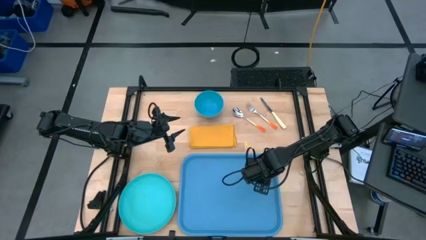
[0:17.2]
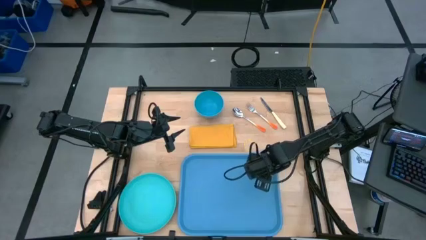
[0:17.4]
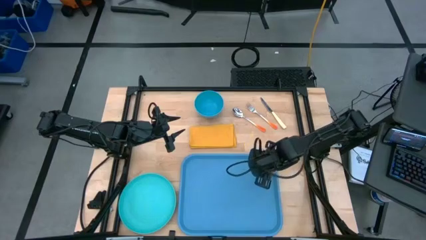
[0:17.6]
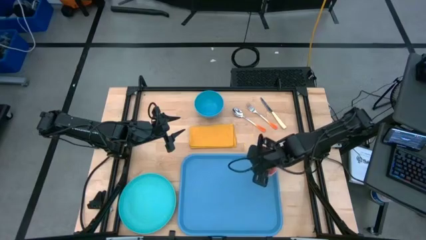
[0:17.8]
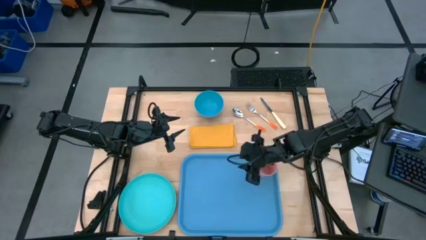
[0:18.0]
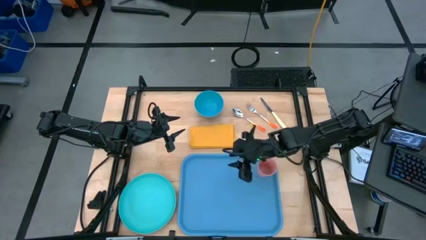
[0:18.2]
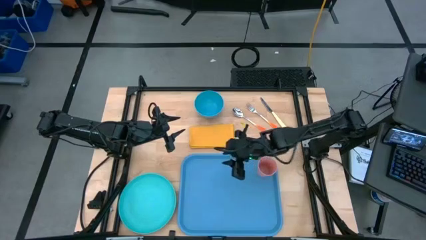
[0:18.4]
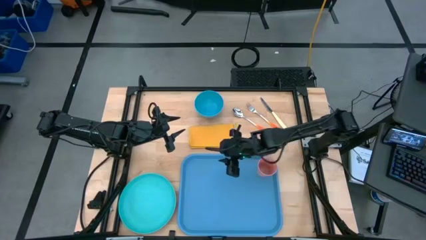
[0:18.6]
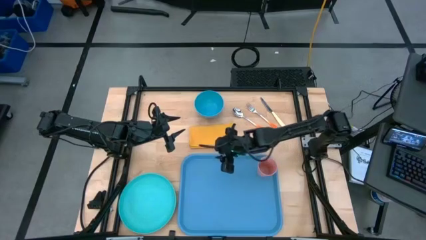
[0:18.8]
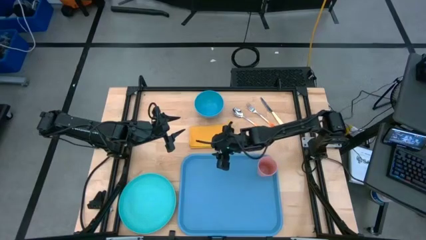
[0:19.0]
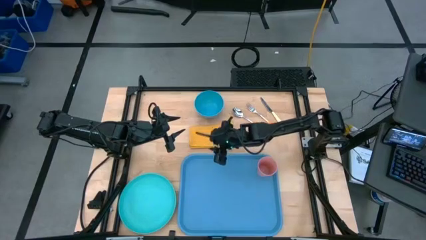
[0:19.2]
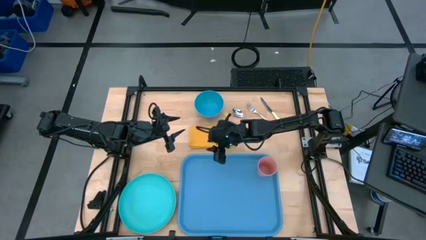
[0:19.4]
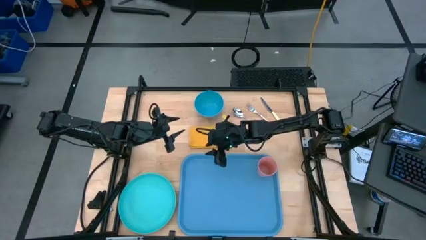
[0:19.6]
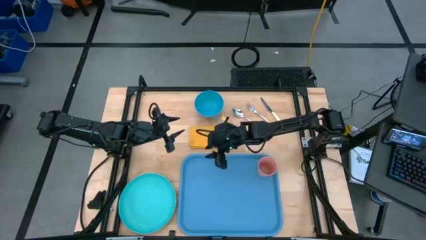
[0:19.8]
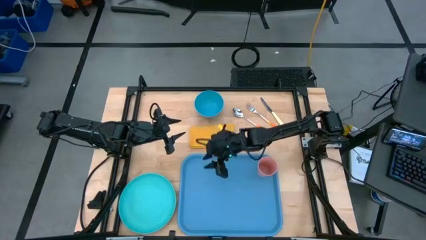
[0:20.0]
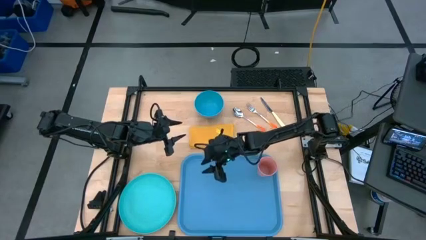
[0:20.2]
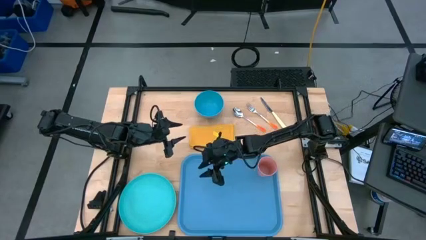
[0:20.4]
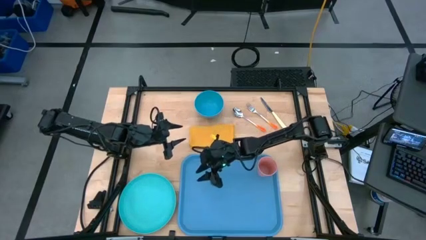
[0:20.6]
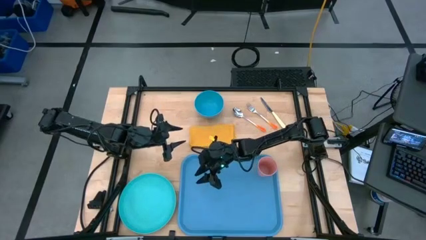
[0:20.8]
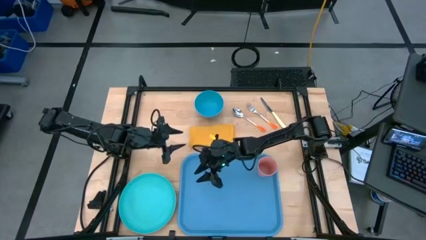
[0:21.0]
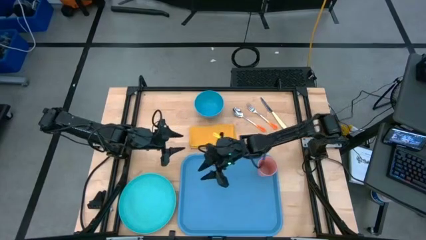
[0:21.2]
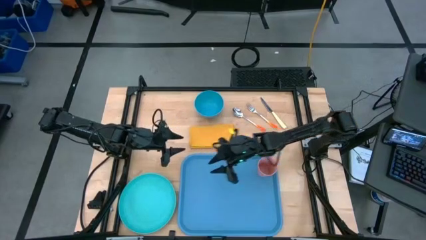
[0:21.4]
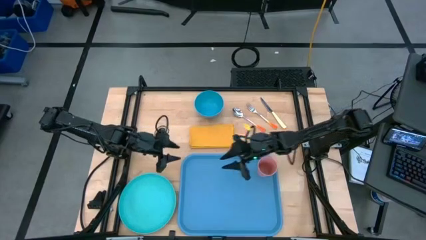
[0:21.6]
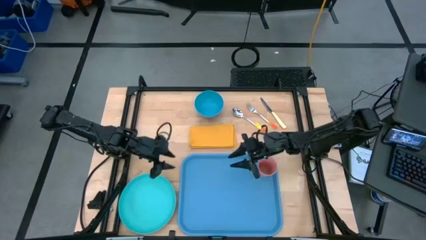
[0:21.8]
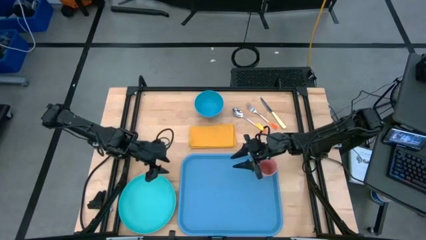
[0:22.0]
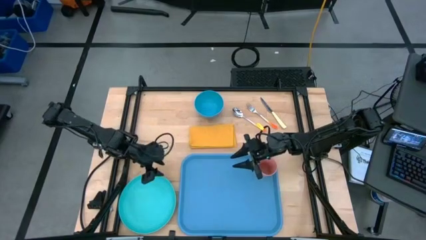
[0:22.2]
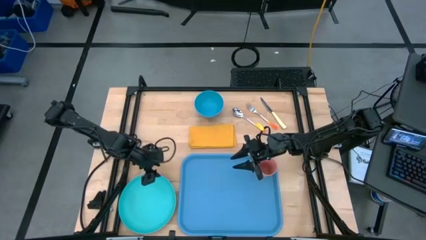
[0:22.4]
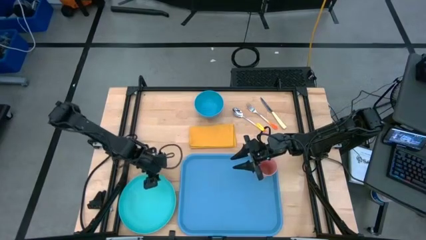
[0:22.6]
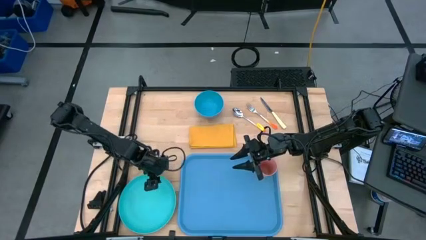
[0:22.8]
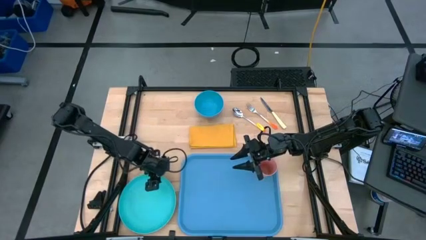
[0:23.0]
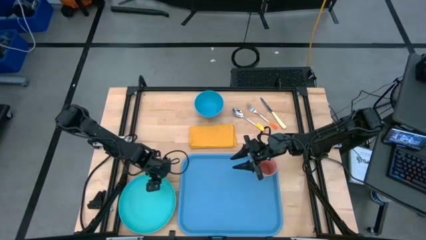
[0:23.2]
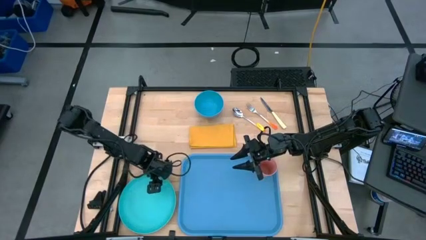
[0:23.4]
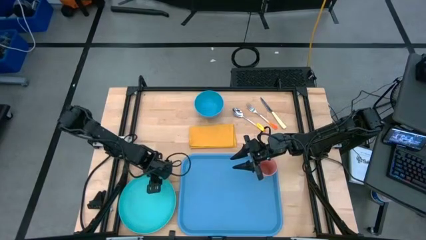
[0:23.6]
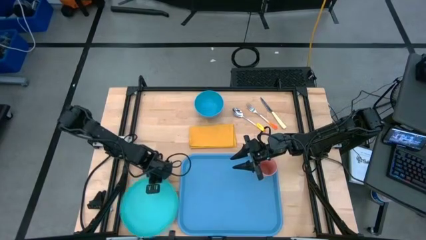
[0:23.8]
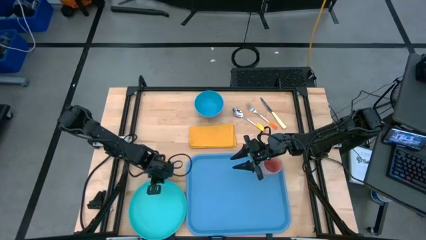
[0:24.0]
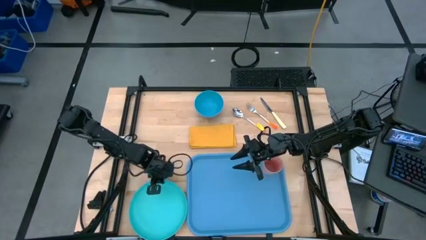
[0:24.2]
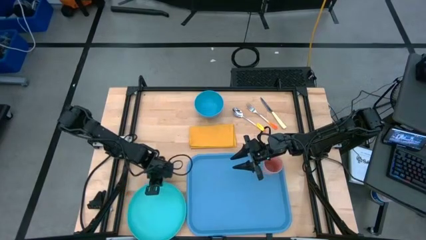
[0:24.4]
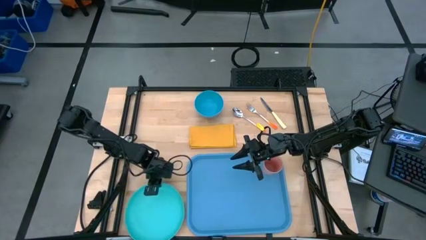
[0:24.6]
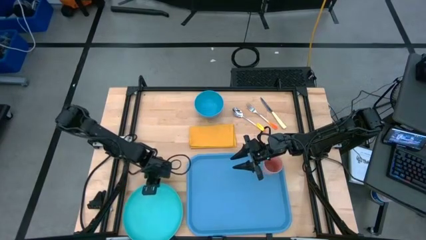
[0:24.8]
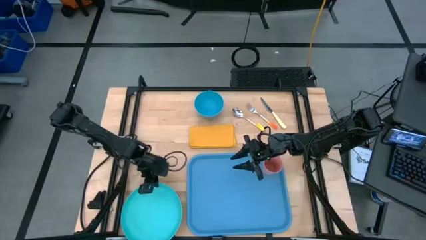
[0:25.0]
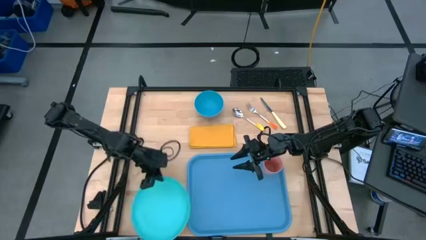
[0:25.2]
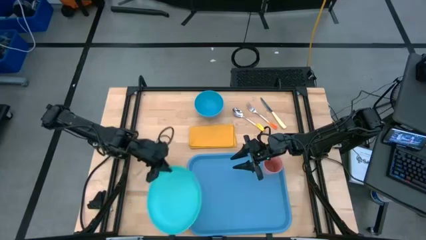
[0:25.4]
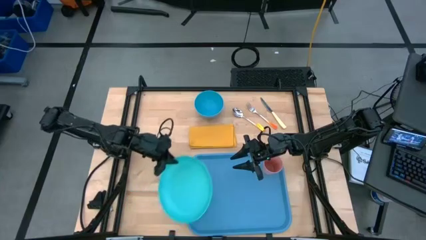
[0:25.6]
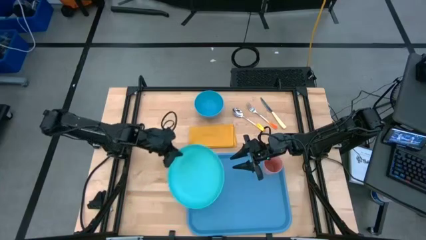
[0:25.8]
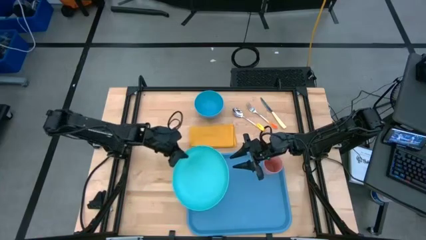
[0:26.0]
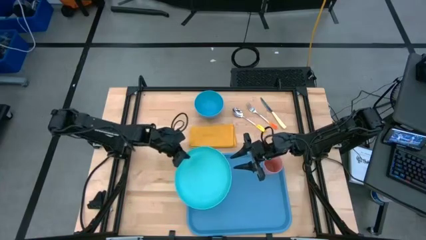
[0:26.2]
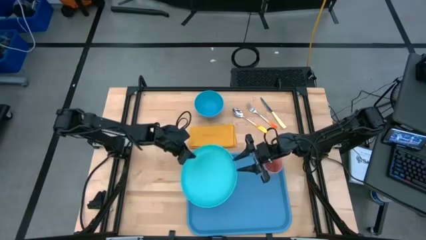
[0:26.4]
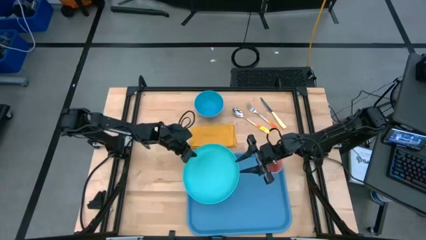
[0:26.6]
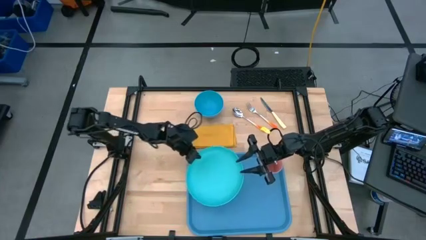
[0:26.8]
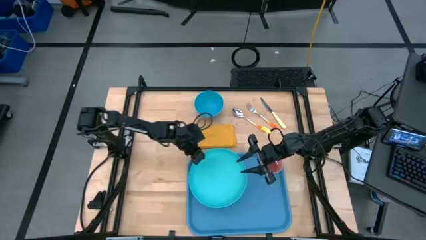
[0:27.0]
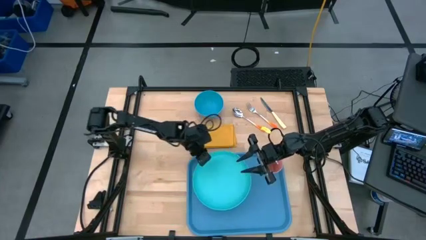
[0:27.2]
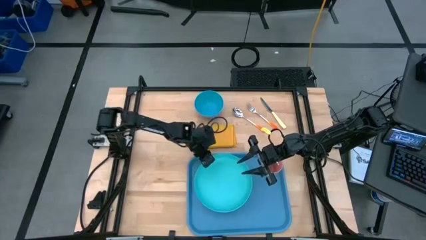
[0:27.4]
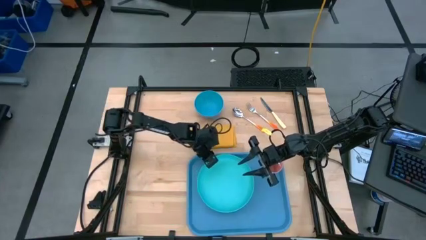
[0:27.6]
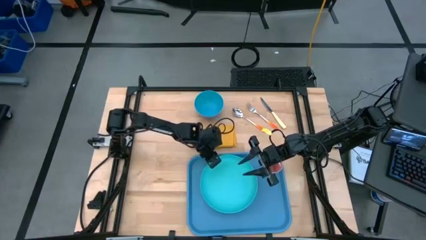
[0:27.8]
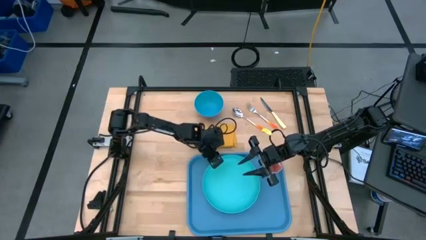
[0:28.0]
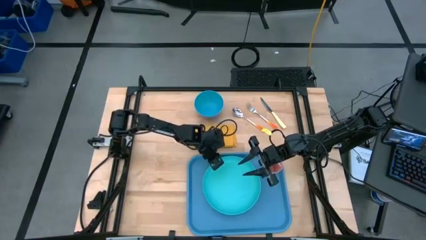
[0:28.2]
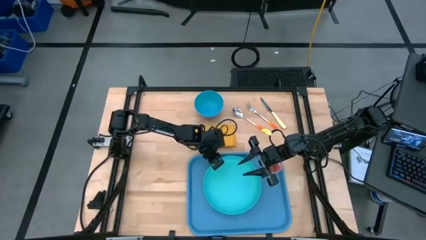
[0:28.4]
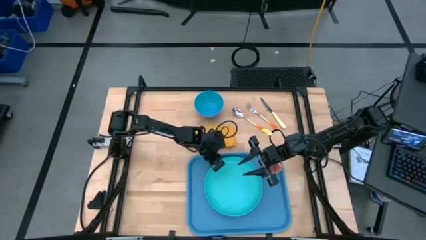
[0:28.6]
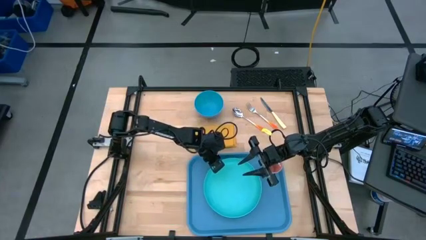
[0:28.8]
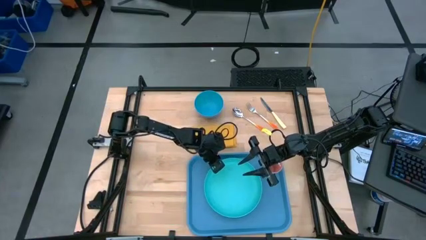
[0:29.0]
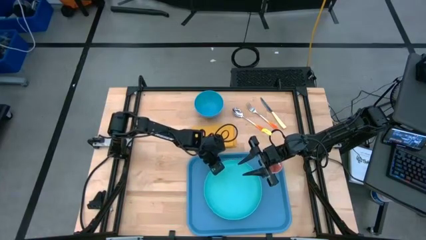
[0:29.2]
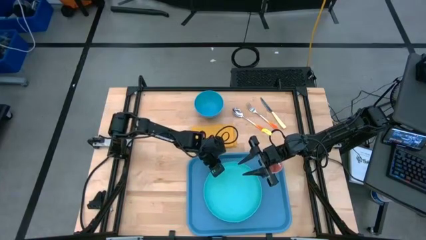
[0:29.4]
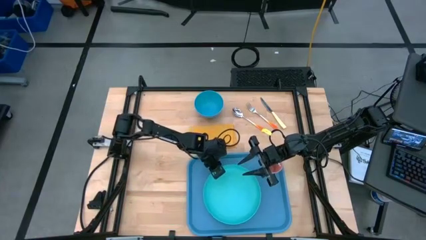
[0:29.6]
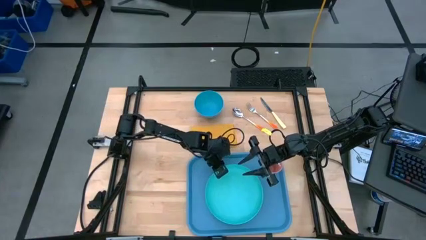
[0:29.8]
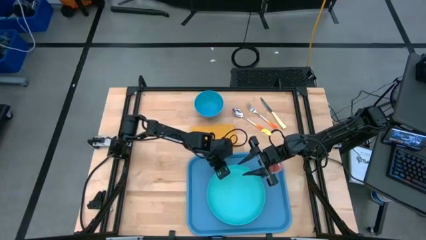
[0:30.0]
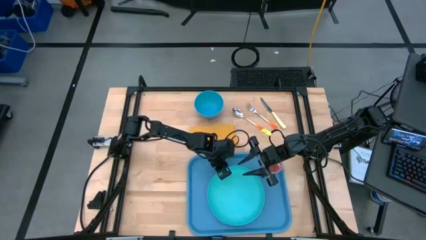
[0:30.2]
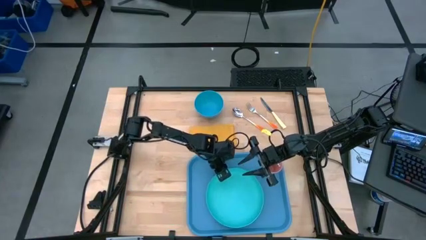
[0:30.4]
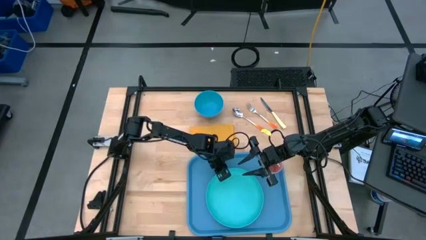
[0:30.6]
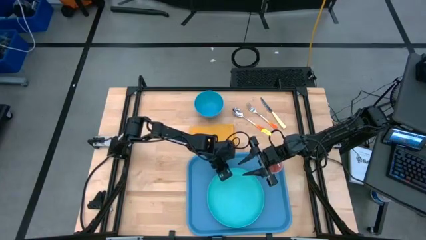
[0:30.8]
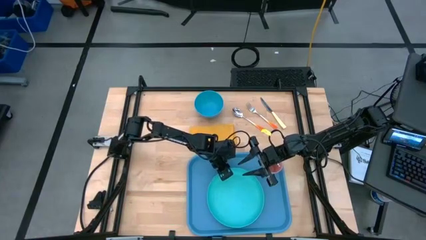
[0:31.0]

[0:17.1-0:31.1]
Task: Set up tray
Put the blue plate at the bottom of the pink cup on the blue serving tray

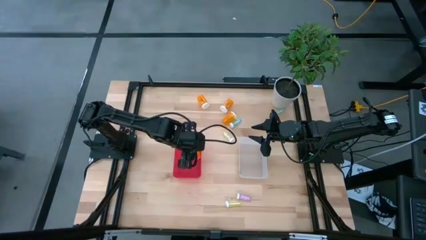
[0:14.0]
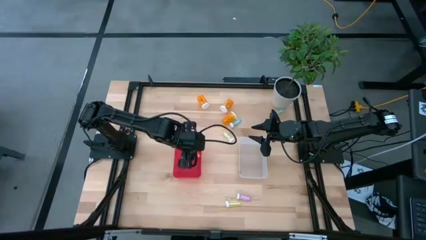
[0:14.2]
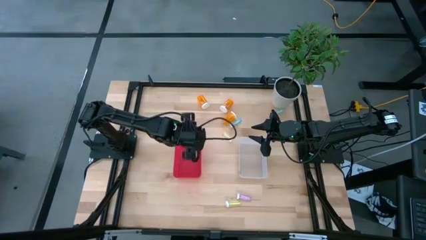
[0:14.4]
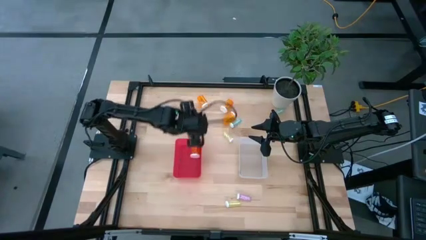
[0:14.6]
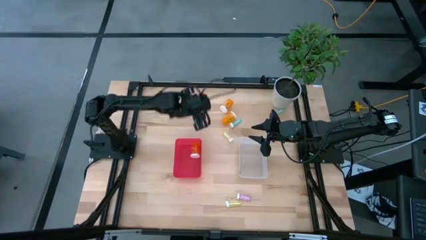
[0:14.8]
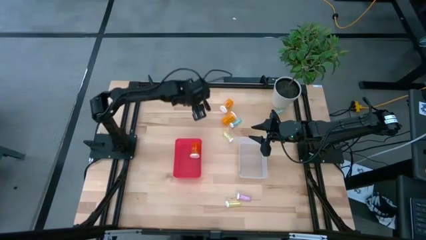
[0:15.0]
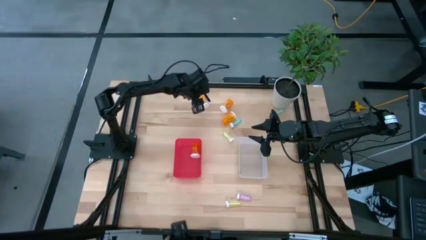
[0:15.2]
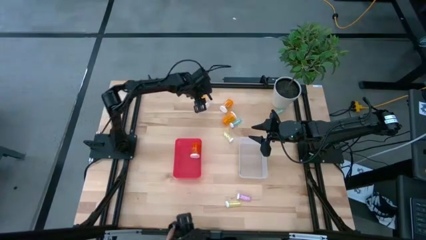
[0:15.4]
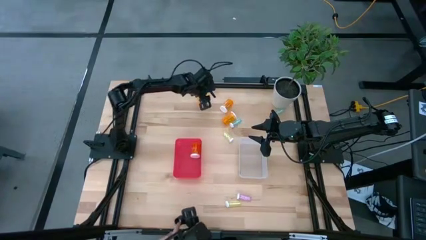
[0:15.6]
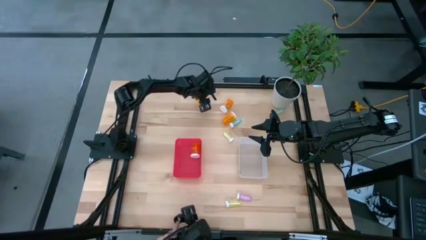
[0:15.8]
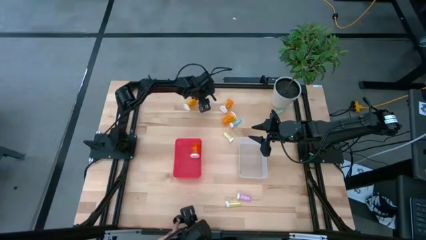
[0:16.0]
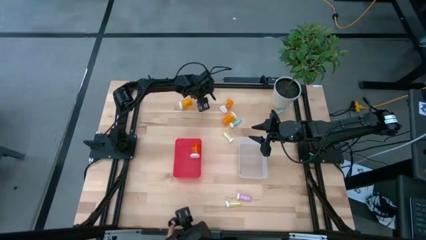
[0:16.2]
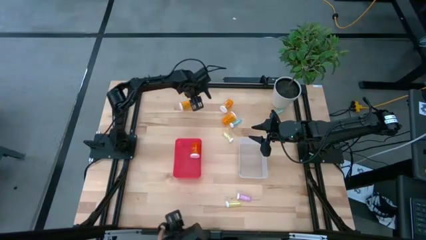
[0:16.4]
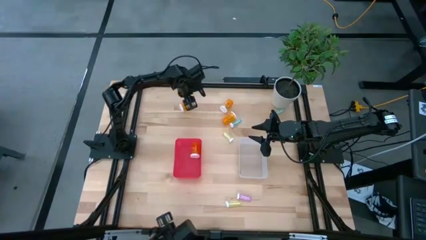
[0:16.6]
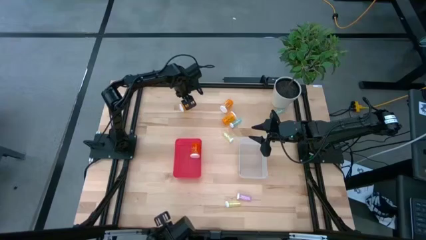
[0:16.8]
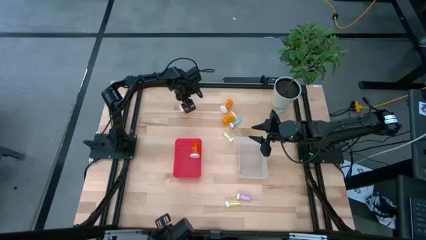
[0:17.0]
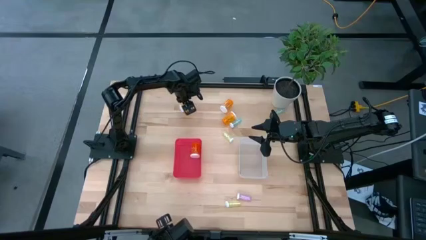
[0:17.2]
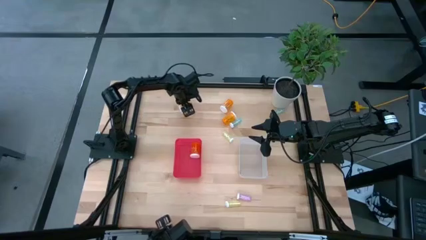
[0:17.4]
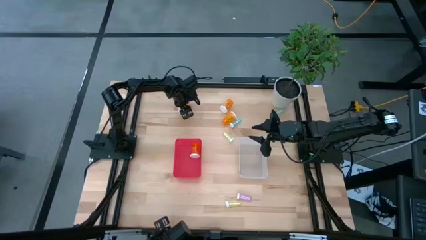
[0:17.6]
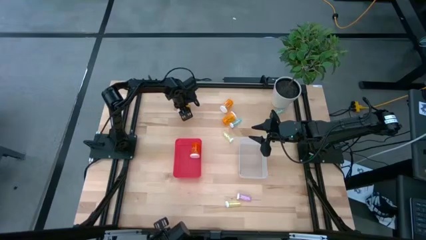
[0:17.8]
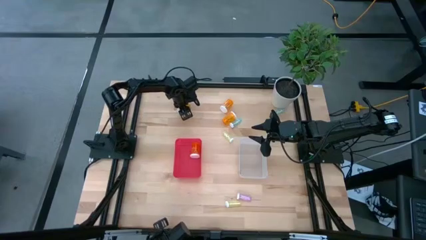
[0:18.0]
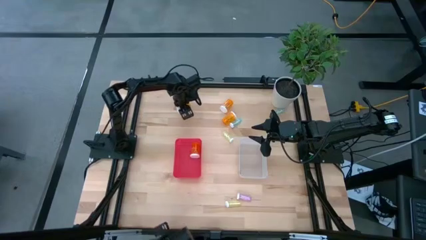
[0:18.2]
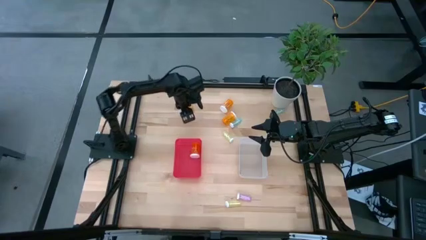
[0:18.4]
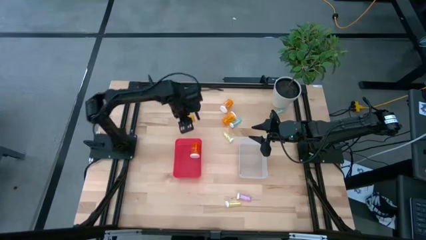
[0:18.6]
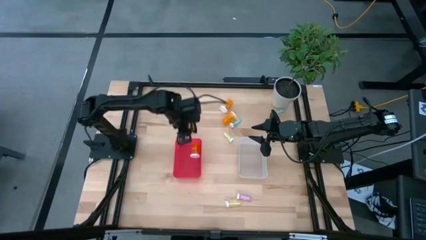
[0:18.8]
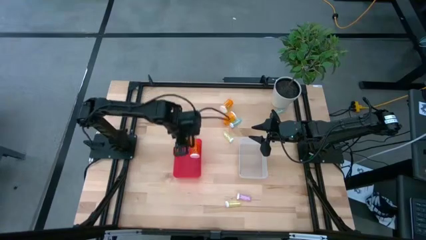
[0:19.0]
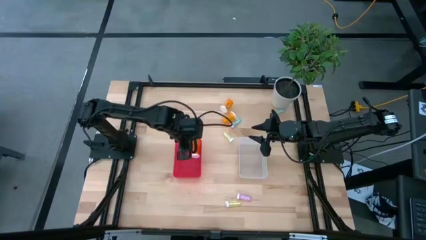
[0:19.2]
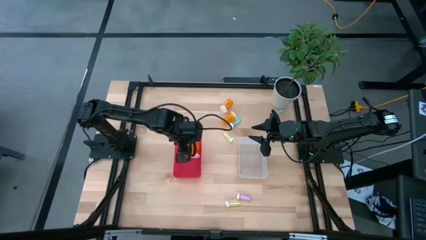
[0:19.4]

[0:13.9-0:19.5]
Task: Pick and place medicine bottles into bin by pill shape (circle, oval)
Put the large orange pill bottle into the red bin
